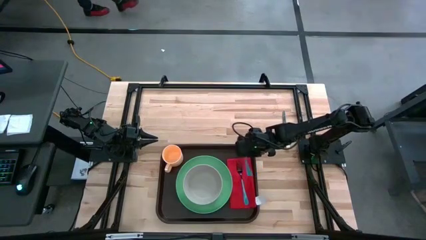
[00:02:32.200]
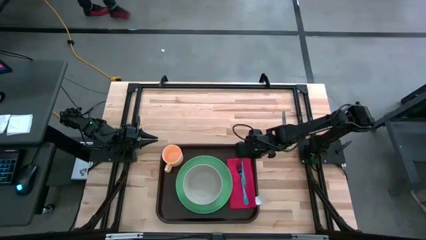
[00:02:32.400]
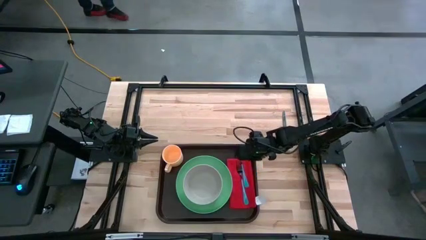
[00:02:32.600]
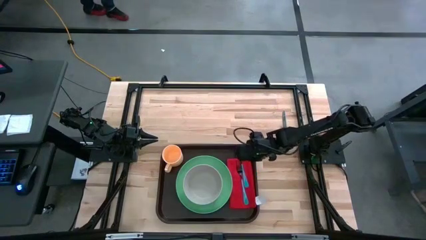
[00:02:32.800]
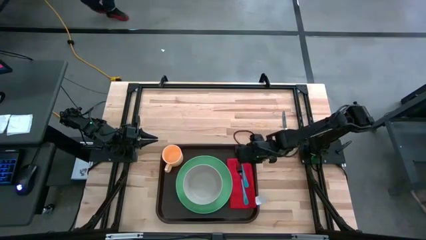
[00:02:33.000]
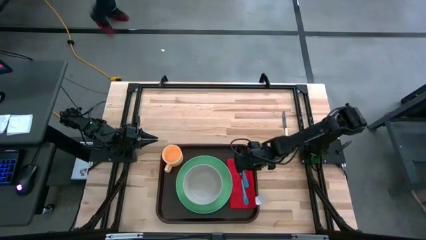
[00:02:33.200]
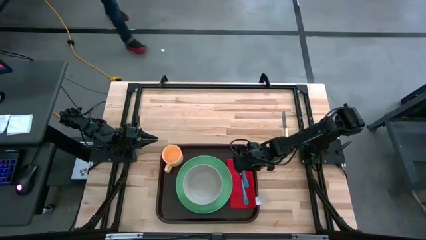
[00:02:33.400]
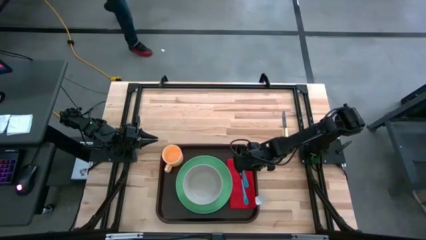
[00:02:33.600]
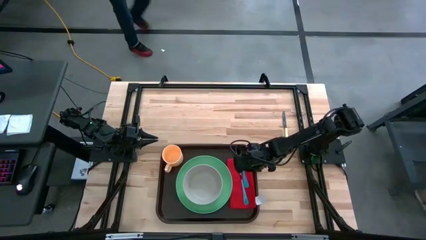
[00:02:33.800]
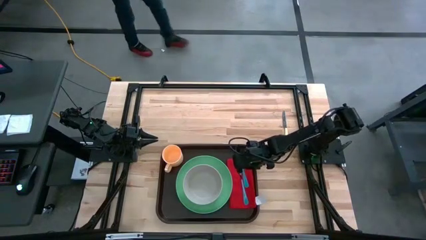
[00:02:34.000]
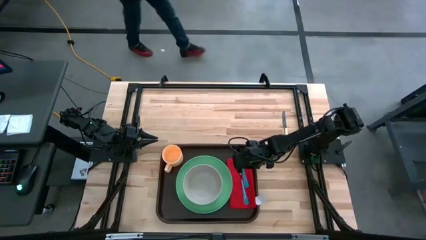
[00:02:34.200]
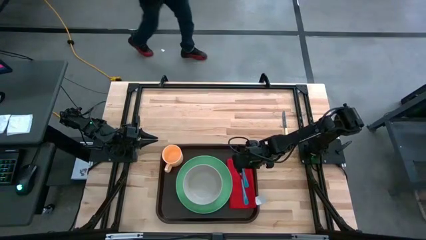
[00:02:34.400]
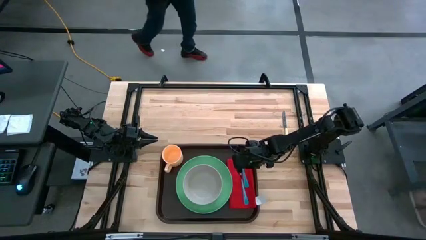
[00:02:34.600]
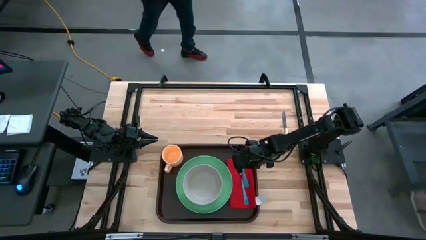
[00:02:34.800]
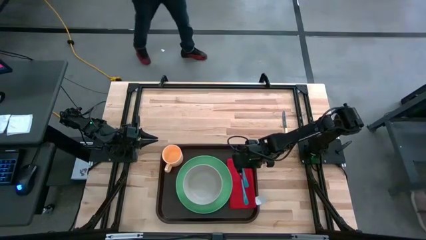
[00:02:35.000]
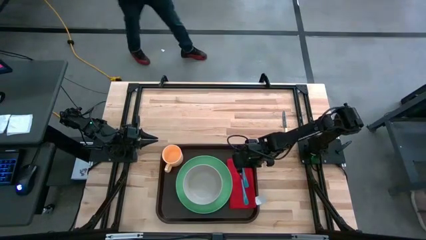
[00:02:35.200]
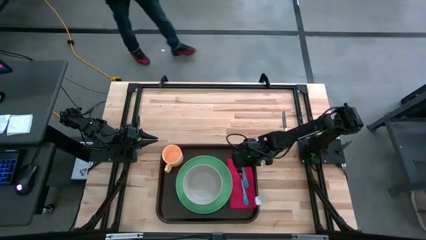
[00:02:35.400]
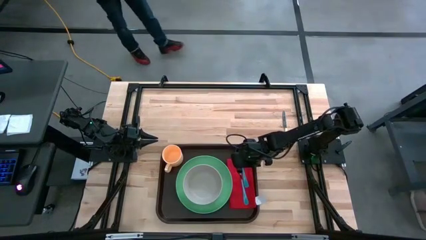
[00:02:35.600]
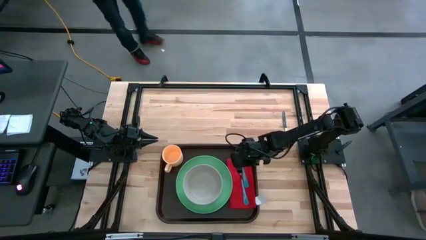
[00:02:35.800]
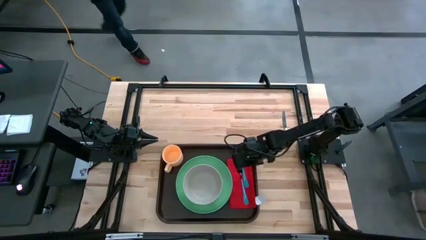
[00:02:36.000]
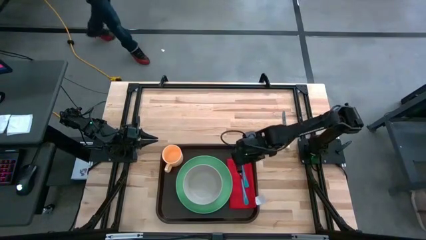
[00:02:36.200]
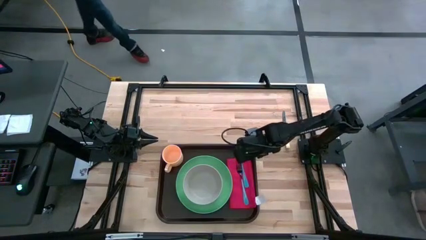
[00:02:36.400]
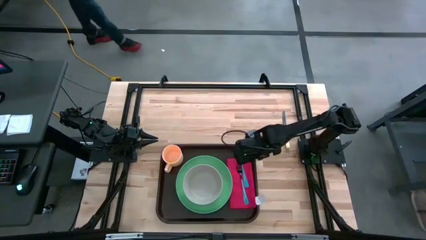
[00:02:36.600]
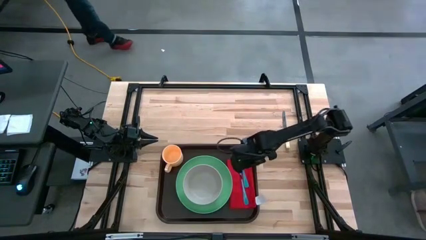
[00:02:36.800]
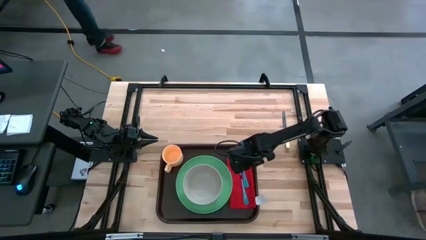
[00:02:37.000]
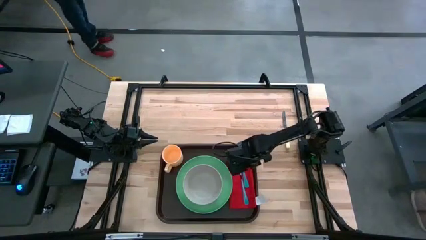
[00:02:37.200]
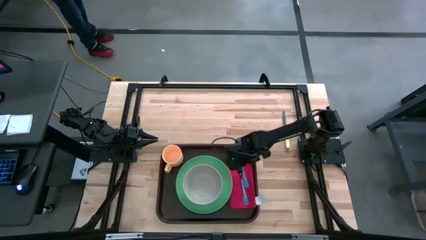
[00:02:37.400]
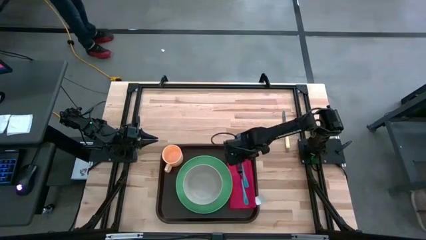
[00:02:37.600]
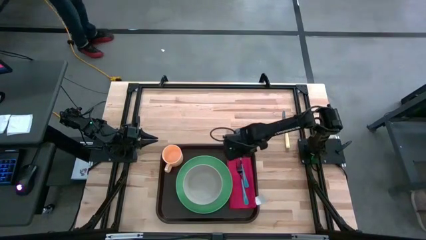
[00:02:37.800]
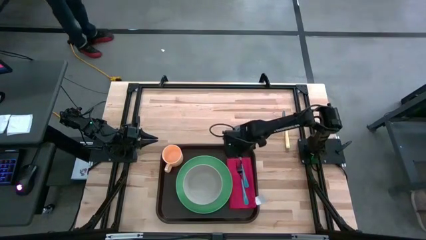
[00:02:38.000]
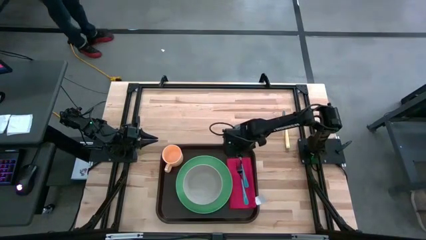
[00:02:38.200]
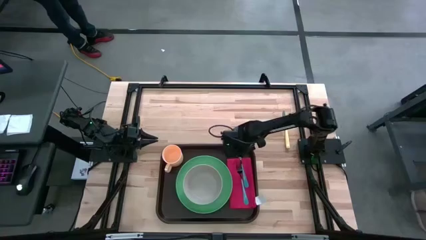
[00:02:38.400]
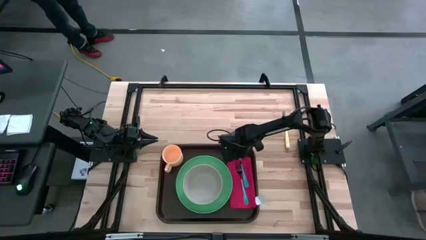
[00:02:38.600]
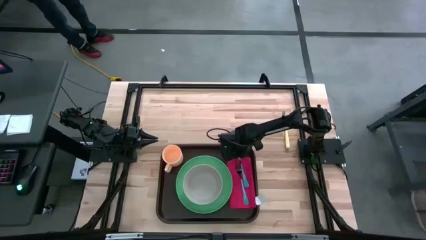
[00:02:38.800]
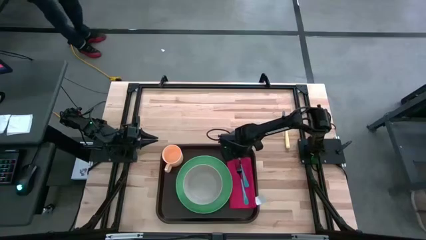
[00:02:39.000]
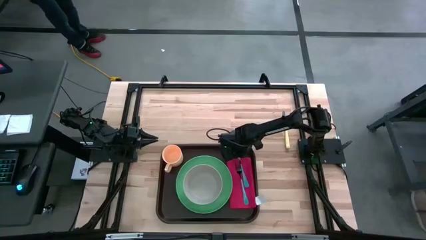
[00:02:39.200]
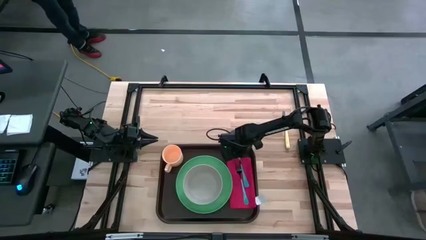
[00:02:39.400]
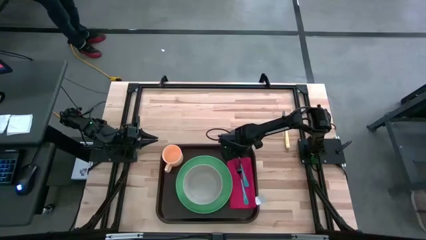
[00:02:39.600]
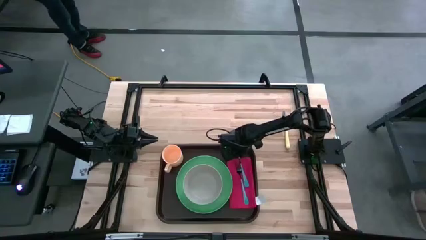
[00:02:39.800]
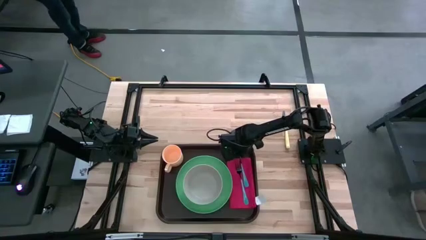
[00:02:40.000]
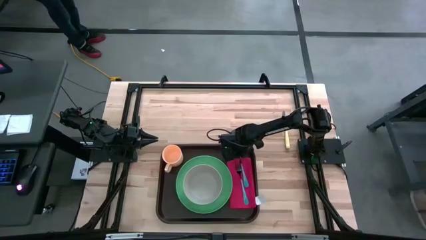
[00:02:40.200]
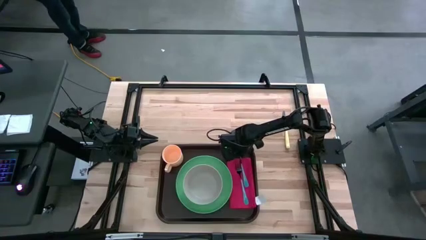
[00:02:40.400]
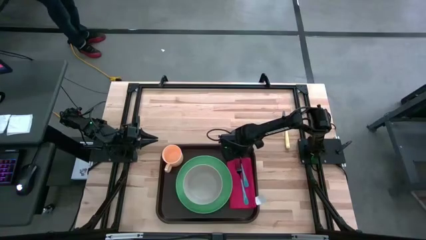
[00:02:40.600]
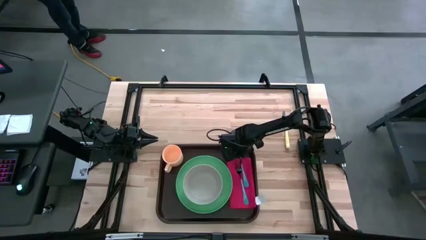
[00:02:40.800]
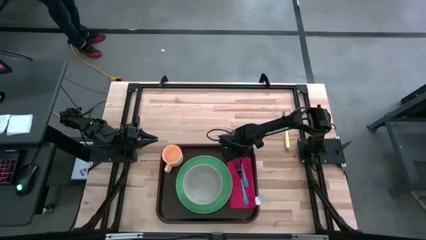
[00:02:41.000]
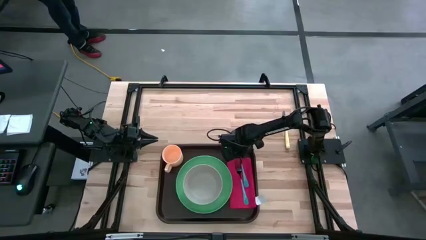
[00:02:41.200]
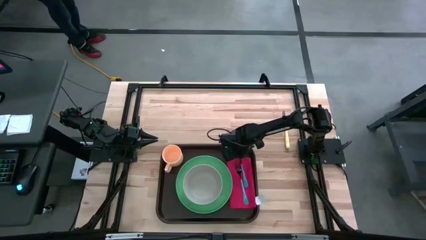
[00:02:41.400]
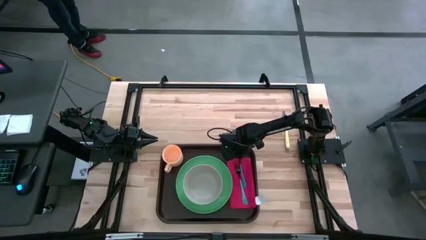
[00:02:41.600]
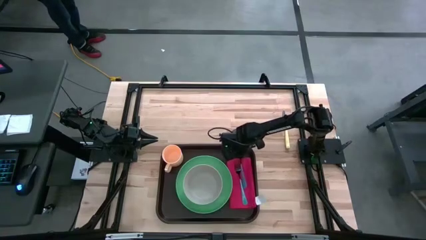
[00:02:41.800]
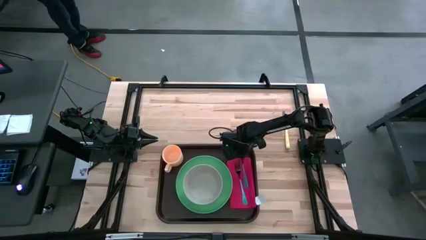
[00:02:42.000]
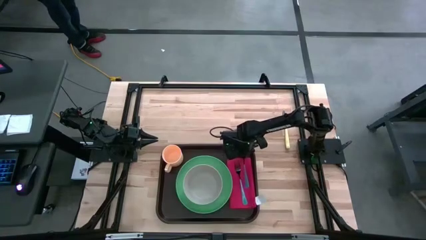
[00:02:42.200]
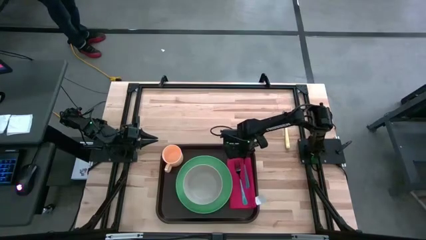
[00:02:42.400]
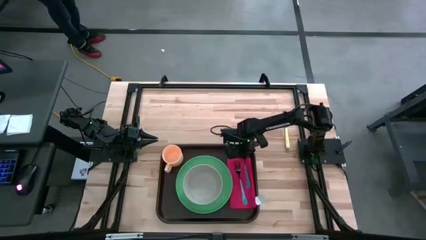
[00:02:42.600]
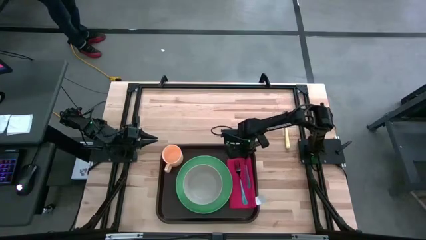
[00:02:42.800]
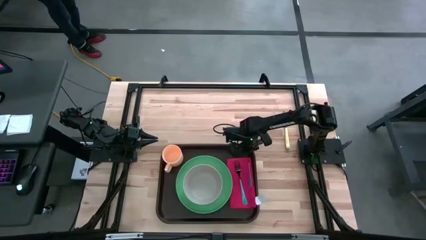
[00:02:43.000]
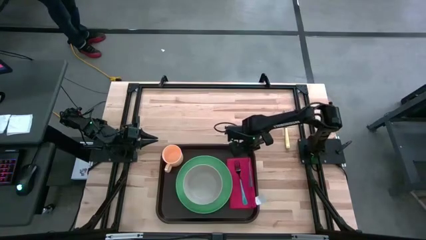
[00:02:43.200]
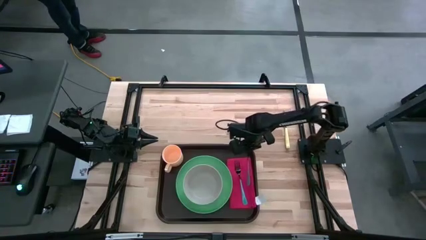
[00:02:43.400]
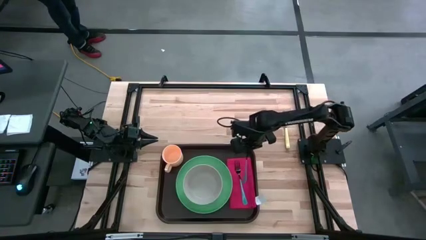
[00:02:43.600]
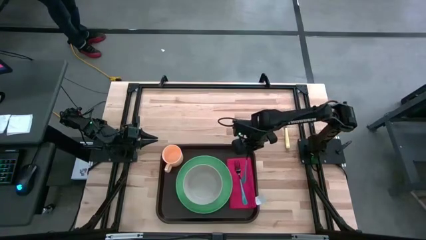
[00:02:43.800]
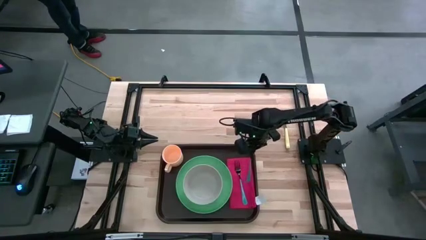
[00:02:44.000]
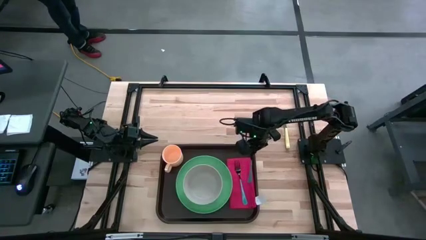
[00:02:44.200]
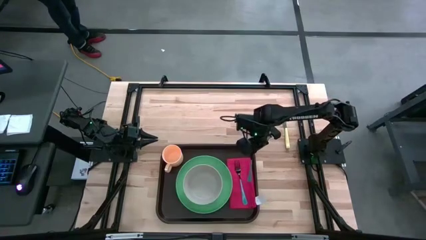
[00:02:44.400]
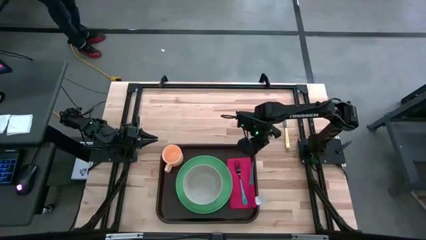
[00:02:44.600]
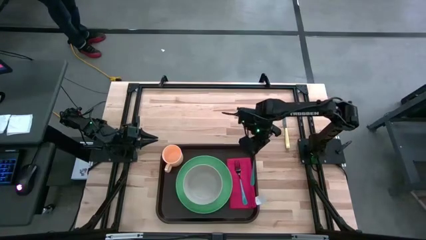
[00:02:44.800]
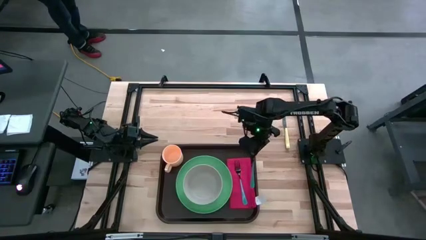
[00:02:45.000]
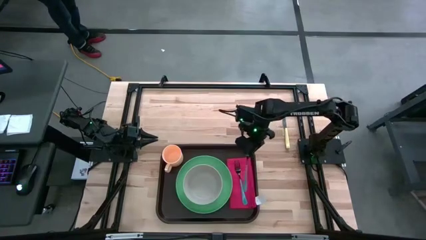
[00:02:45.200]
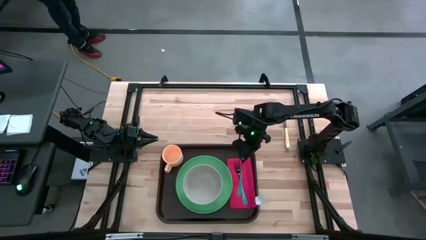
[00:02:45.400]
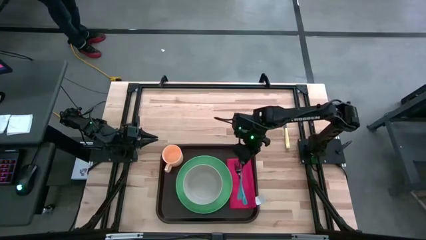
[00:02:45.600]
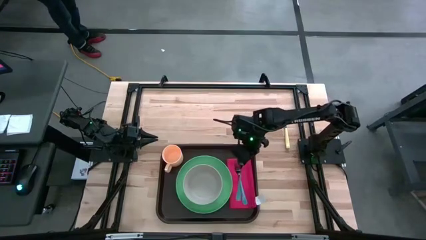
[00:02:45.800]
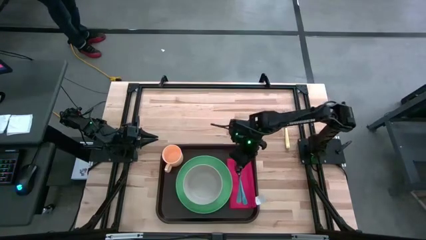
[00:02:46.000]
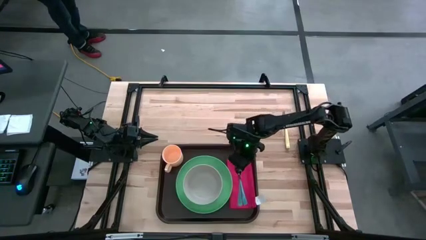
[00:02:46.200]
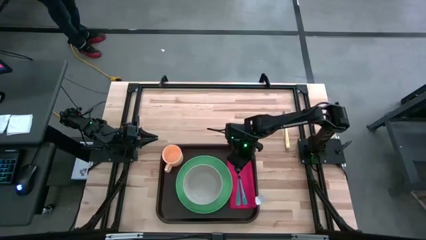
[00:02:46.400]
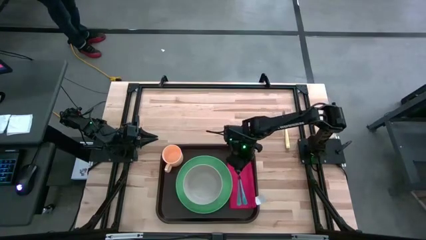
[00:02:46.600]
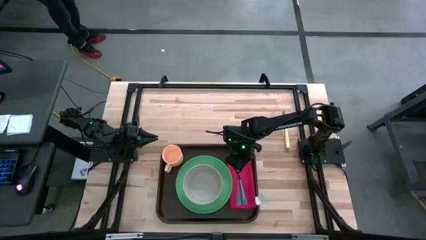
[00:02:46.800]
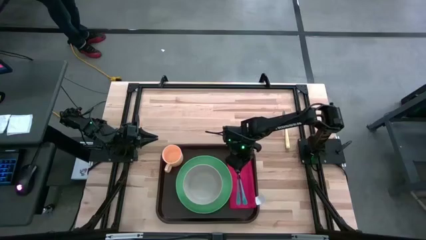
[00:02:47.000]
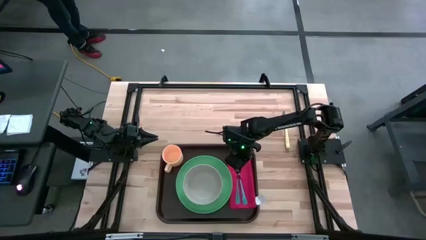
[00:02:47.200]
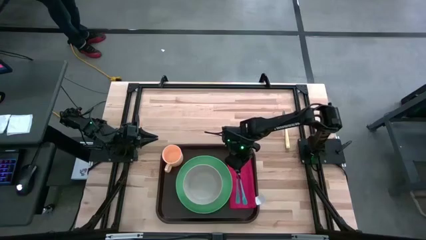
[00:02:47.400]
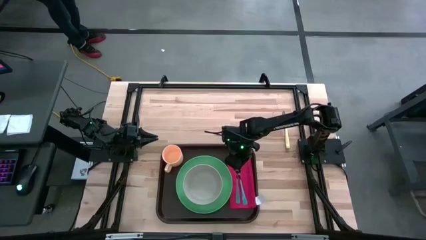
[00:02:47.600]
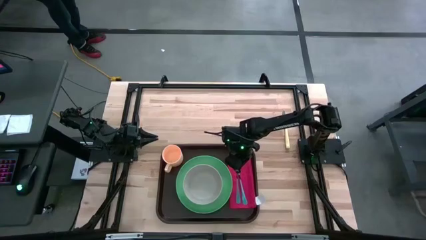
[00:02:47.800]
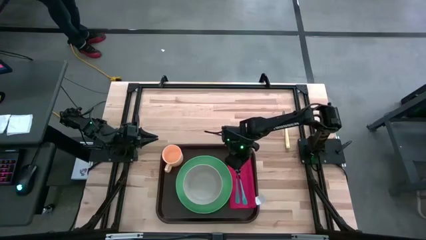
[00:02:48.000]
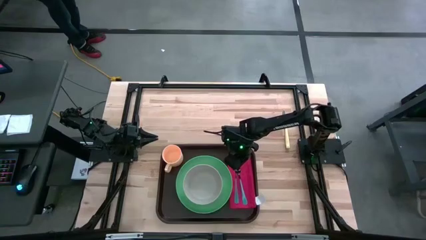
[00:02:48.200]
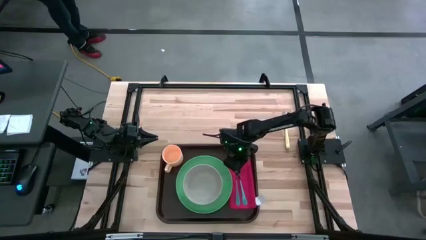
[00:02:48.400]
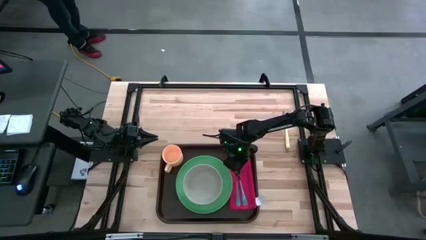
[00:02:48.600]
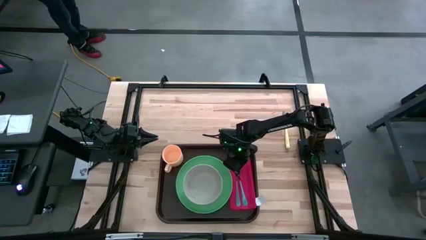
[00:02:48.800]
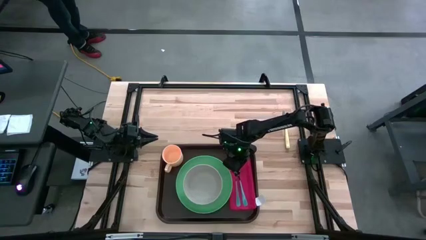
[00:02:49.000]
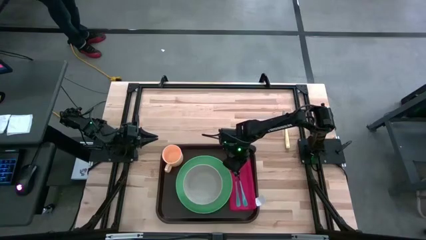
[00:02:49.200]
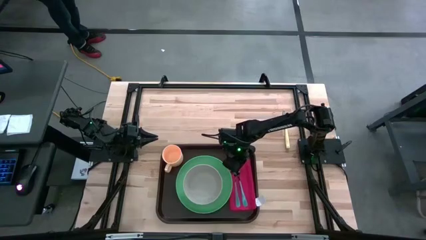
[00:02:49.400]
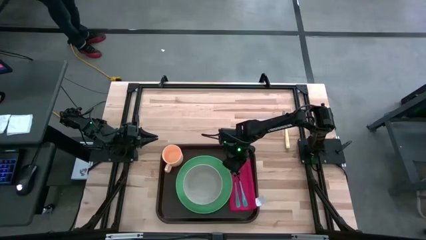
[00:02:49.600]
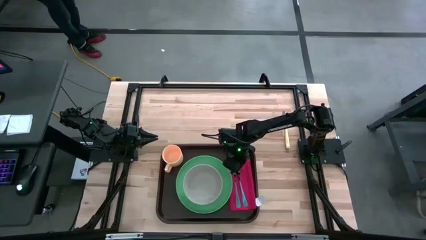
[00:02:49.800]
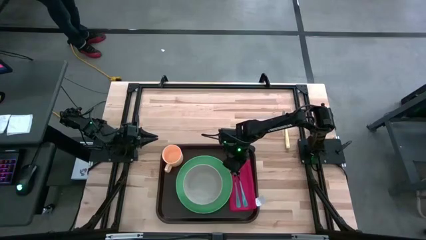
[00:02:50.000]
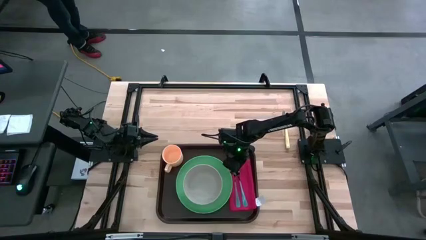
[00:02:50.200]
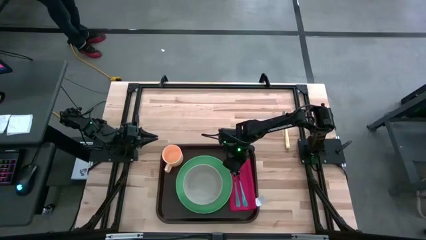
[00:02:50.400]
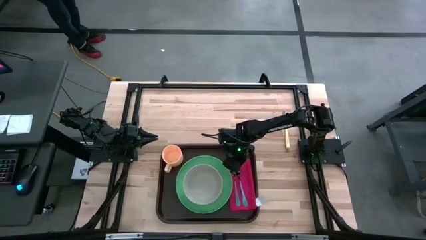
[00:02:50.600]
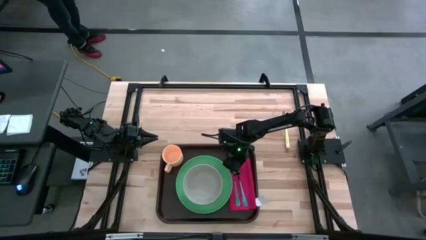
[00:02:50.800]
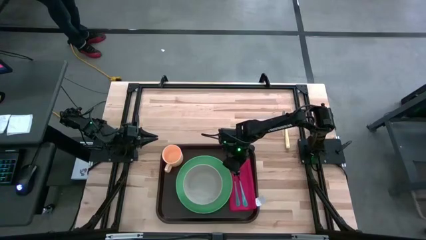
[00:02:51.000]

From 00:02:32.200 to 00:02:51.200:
Task: Set up tray
Put the spoon on the table napkin to the left of the fork on the serving tray
